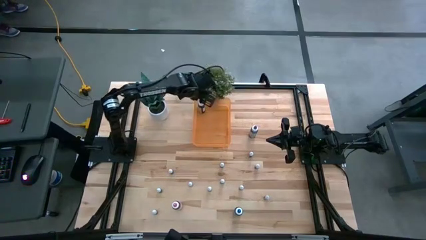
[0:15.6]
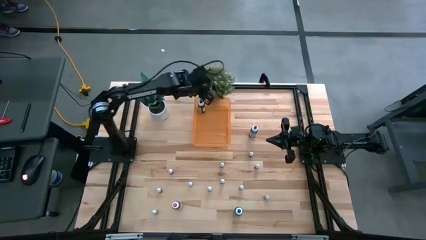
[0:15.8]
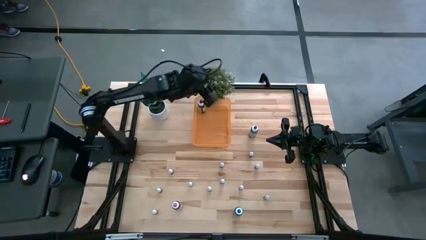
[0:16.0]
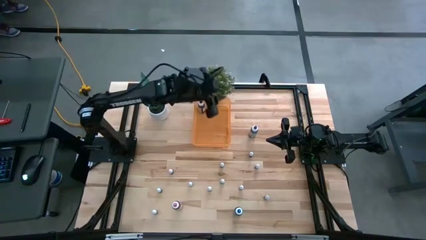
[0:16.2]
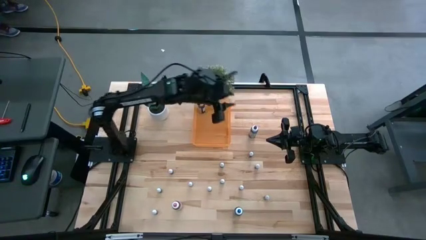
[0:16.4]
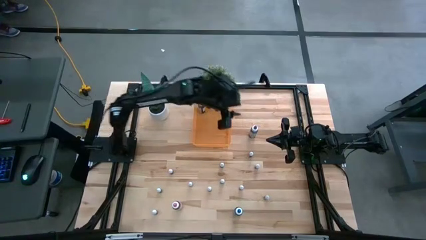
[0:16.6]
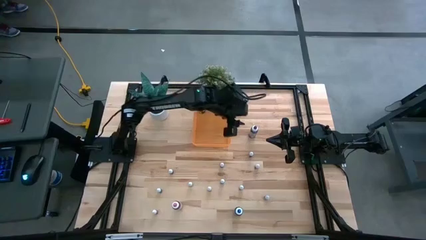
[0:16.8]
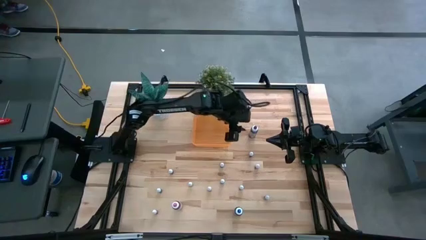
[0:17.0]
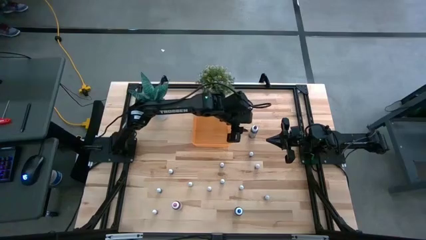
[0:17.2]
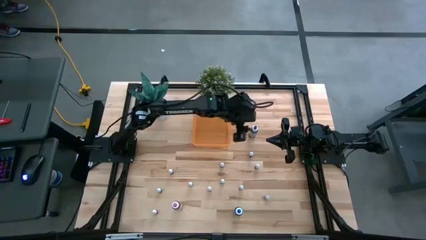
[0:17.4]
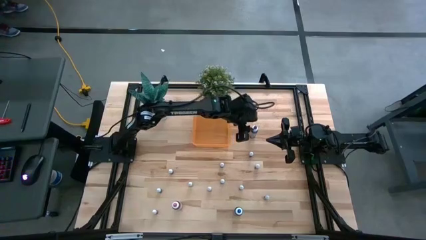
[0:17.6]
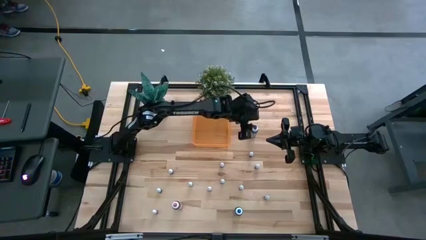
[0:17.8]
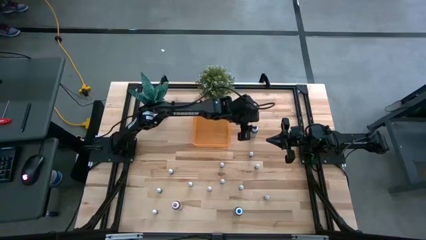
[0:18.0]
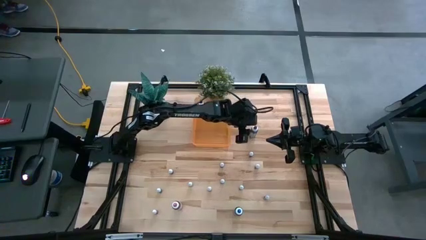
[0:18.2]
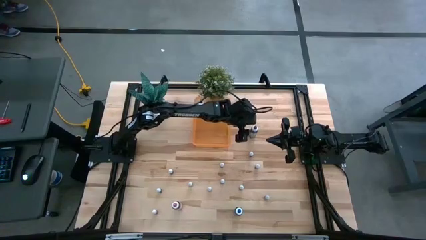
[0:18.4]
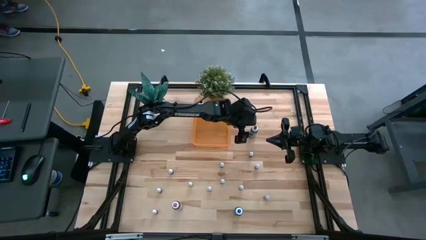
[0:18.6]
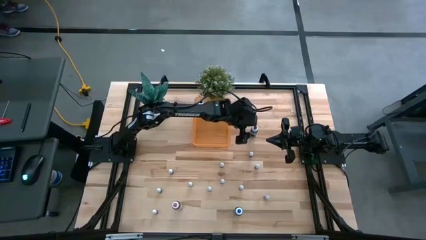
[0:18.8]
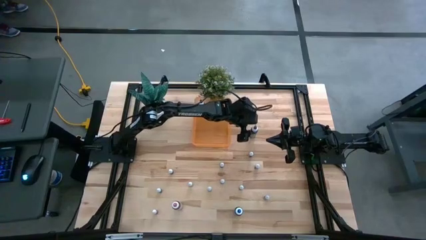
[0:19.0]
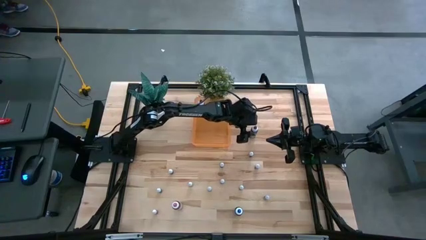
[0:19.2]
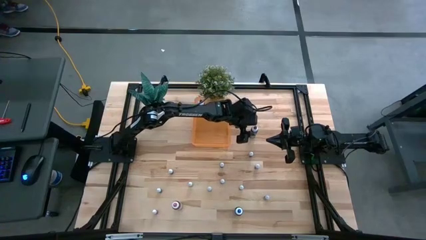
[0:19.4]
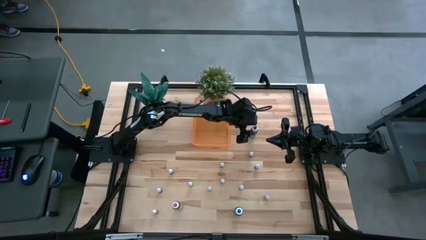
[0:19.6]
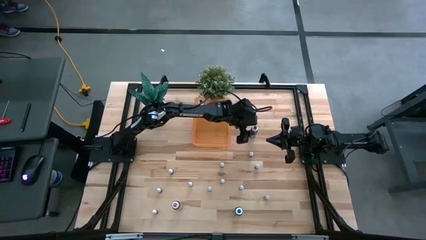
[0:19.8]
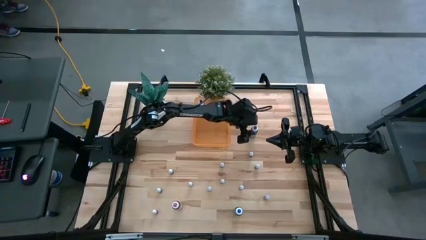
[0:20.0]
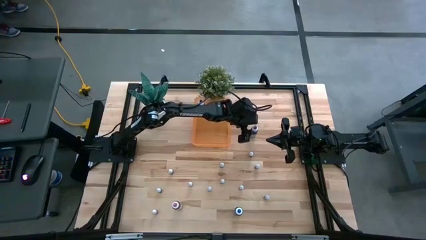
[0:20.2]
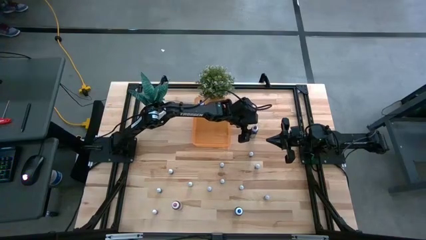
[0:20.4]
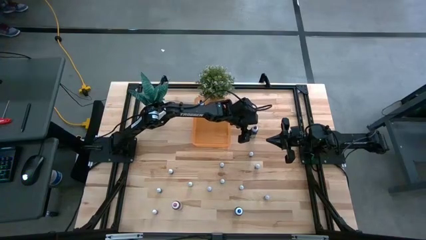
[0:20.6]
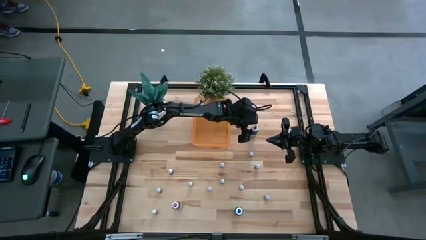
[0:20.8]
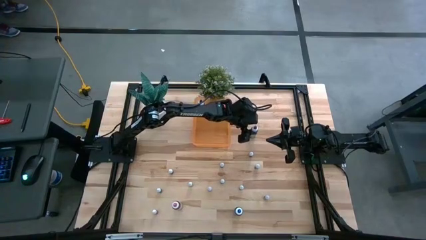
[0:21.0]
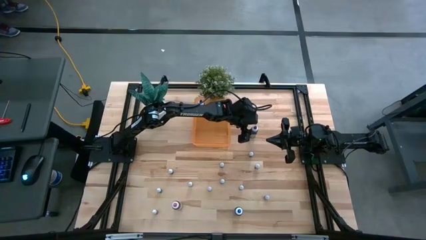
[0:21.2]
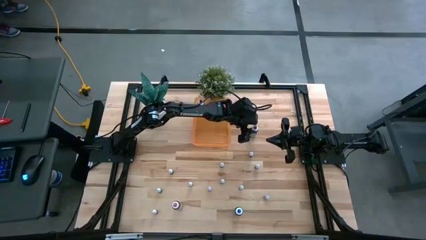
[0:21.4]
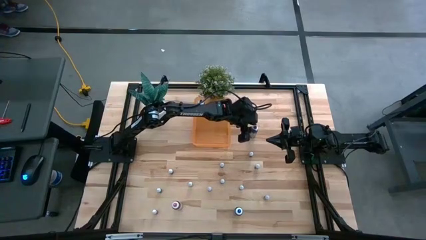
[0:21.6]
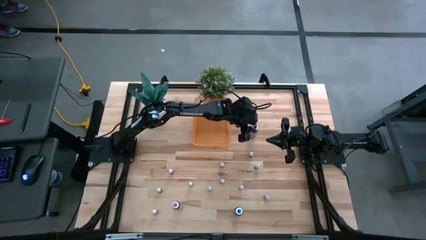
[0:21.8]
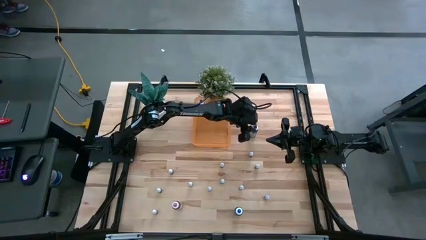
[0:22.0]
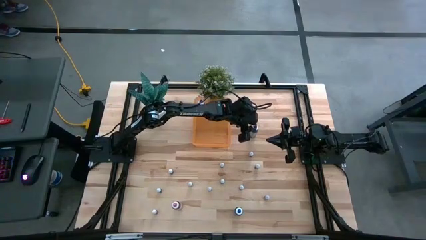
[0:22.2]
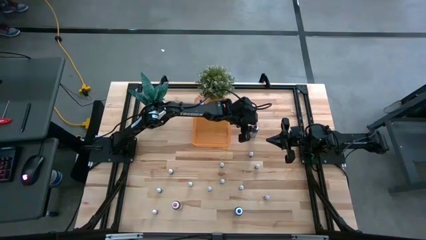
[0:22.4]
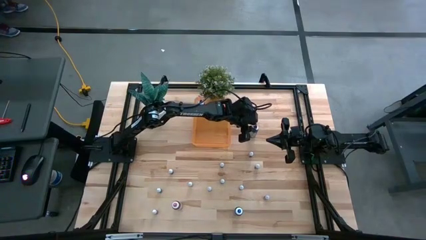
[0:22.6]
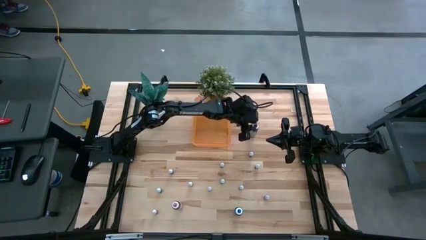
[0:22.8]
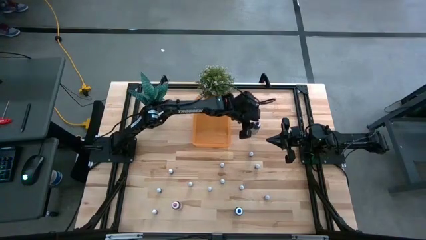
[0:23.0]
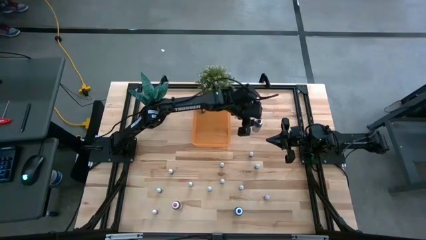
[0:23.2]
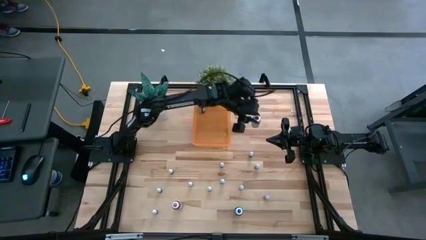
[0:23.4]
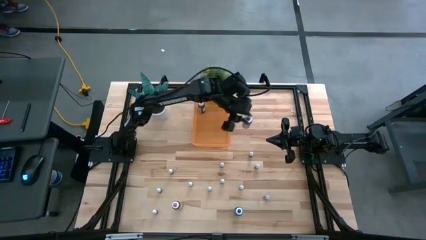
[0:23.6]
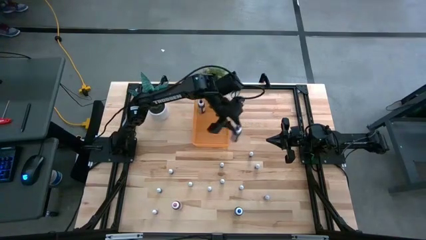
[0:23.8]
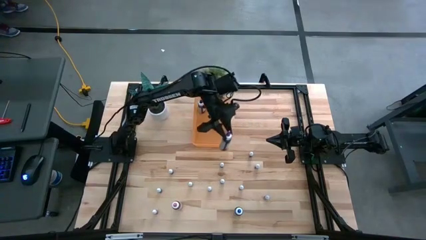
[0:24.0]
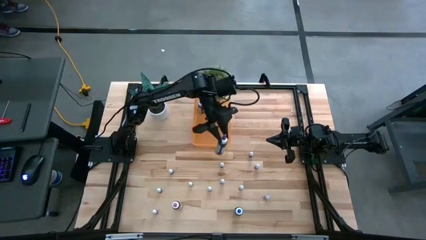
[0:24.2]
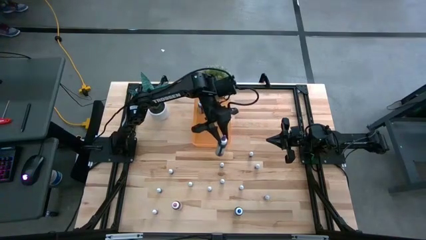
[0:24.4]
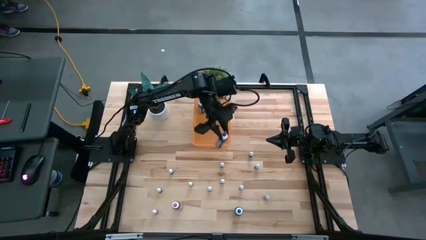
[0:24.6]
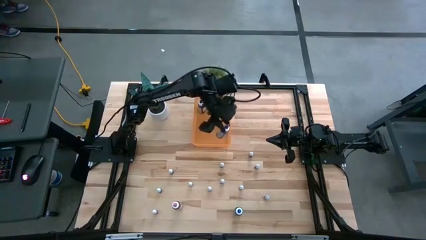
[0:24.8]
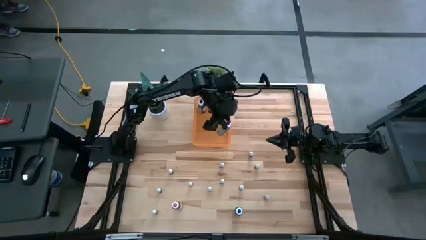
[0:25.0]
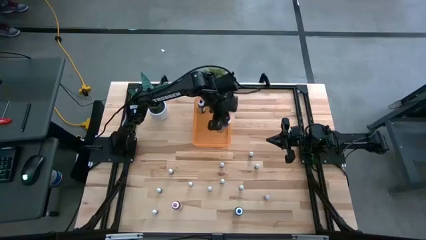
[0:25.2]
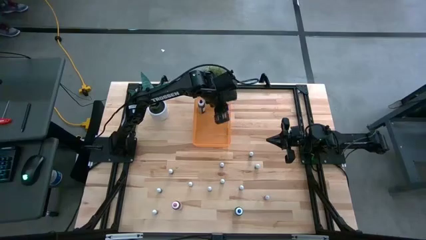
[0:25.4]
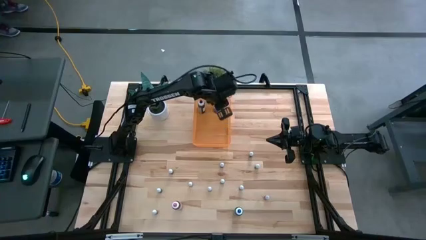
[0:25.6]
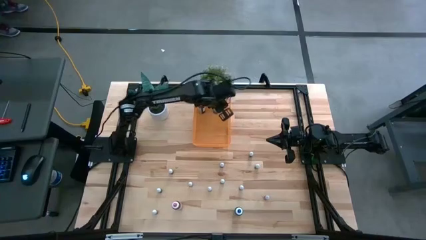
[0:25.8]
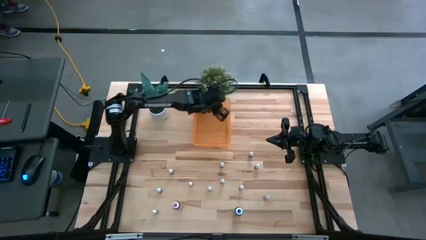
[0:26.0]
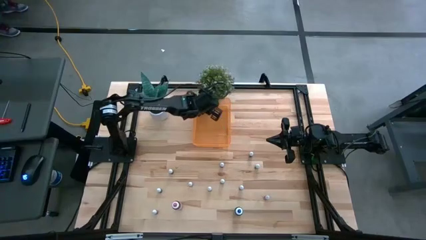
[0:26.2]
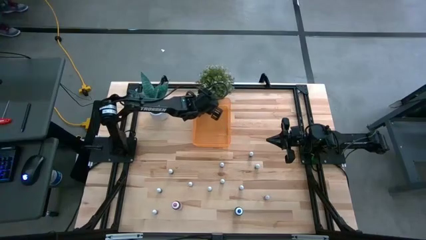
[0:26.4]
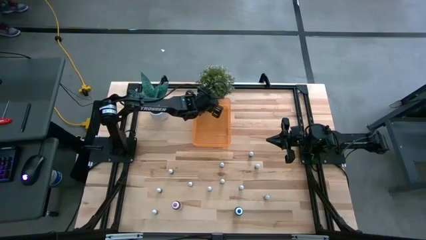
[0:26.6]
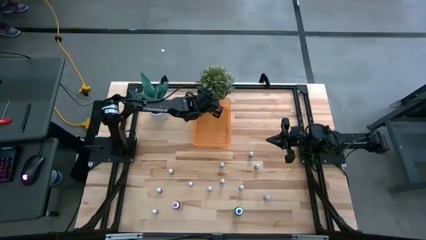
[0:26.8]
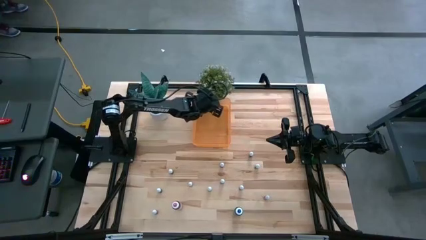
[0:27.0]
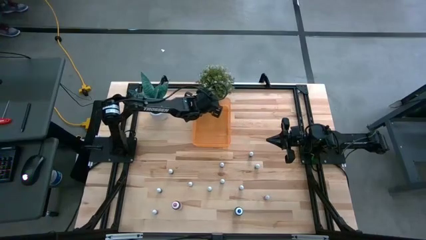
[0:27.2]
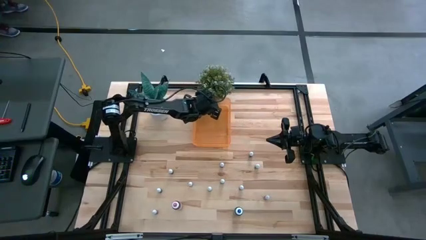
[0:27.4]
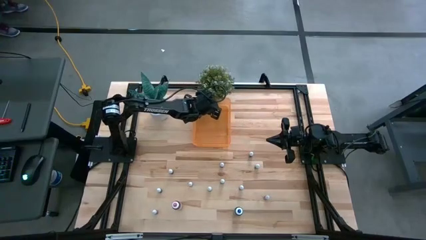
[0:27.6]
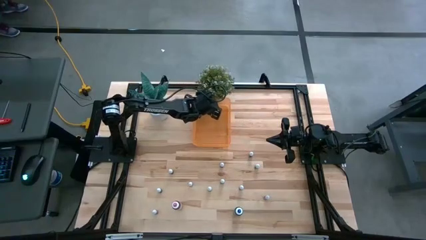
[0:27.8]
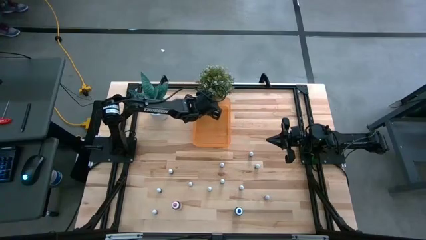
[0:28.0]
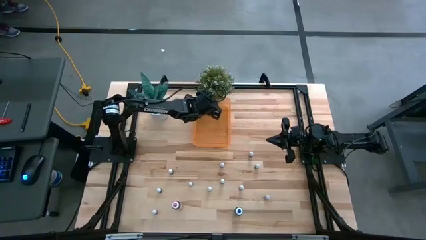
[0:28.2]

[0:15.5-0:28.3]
Task: Pick & Place food coloring
Put the large violet food coloring bottle into the orange bin
